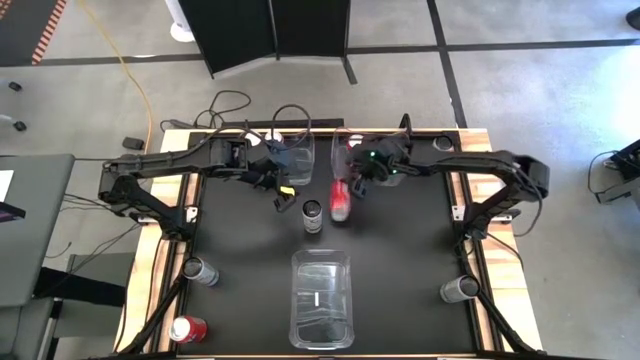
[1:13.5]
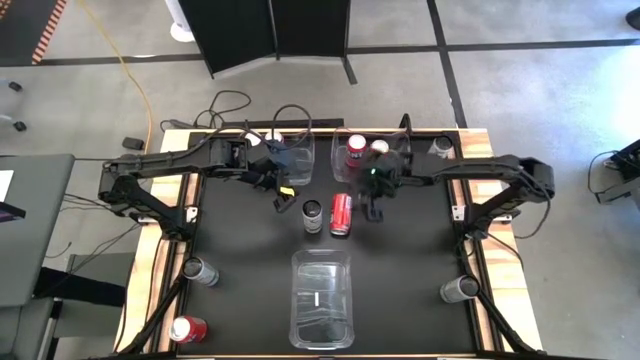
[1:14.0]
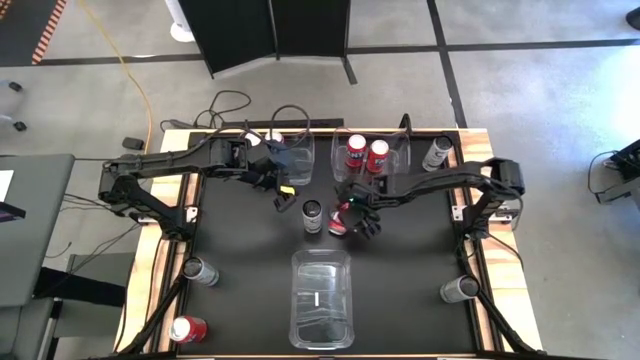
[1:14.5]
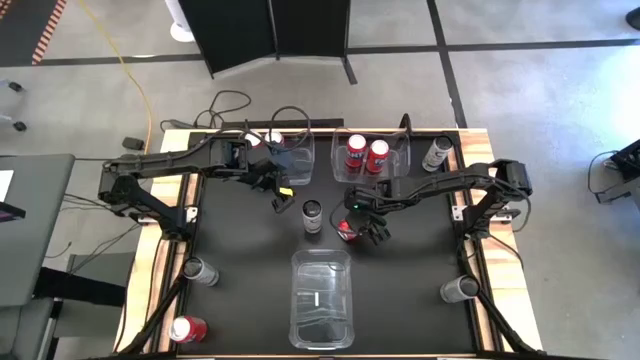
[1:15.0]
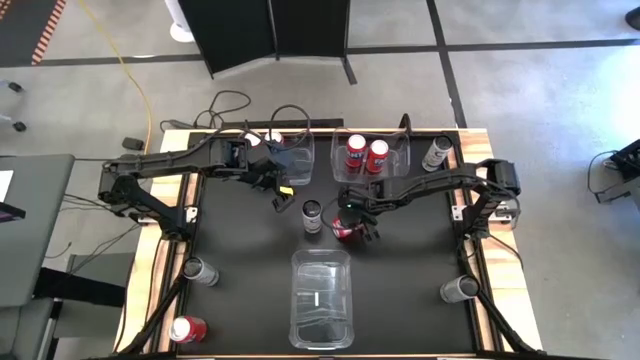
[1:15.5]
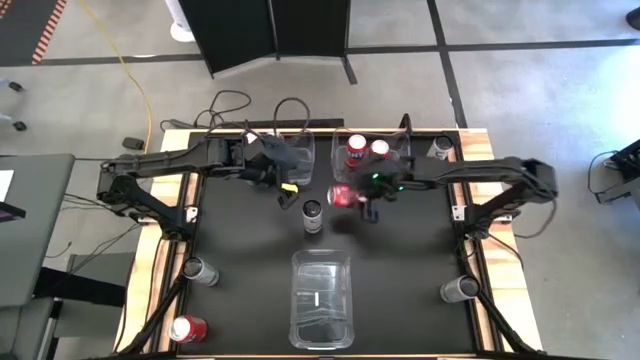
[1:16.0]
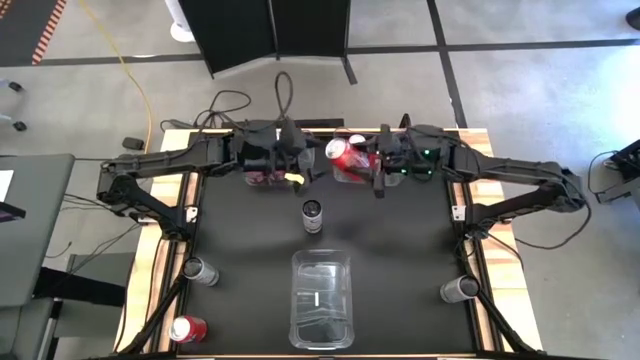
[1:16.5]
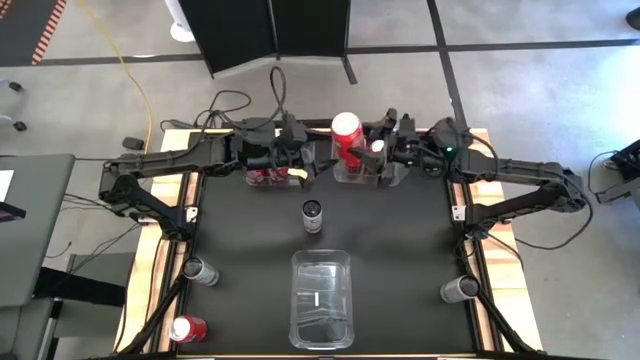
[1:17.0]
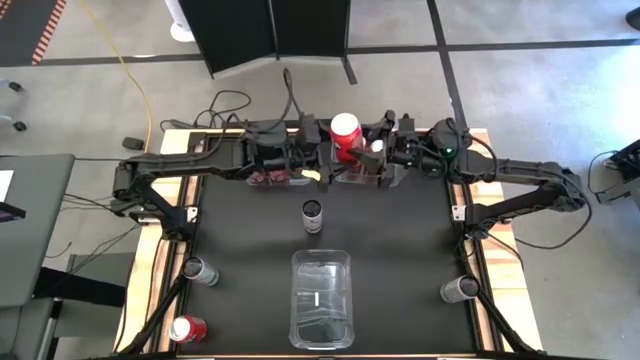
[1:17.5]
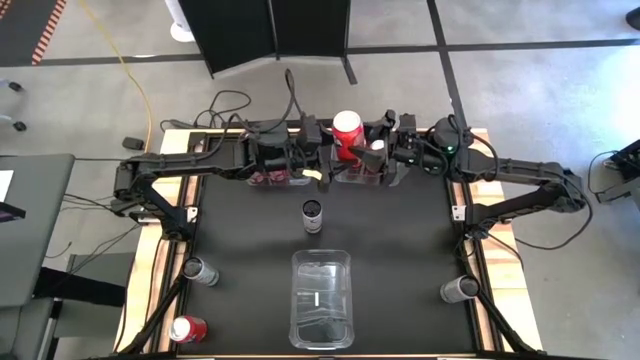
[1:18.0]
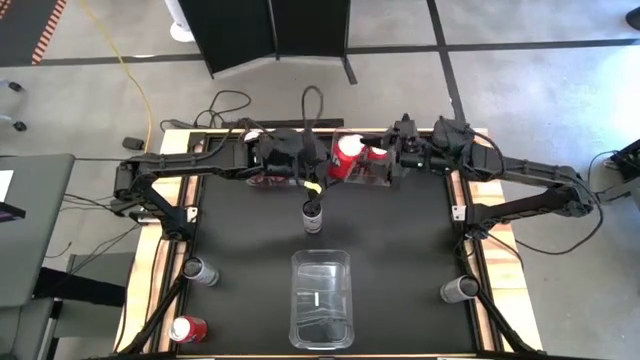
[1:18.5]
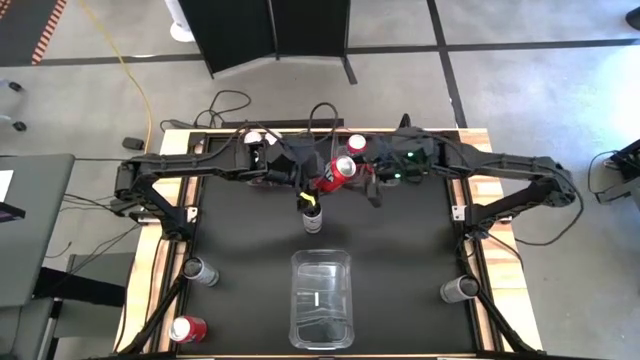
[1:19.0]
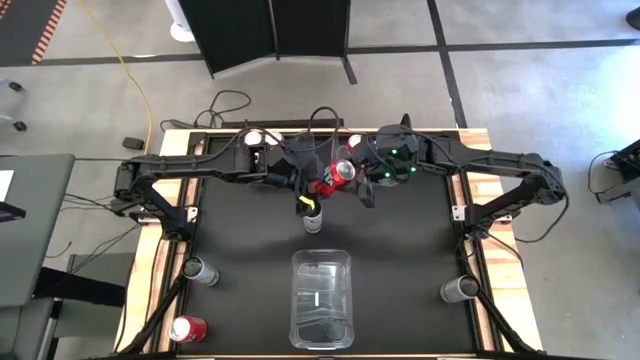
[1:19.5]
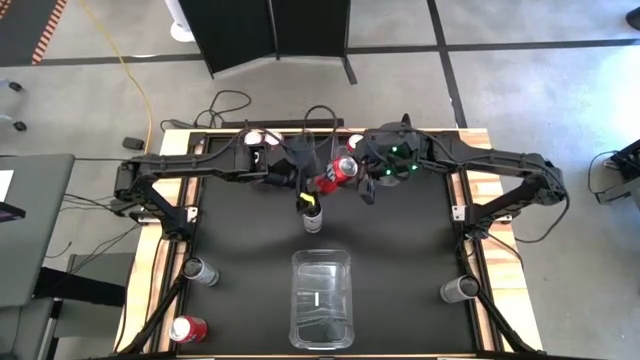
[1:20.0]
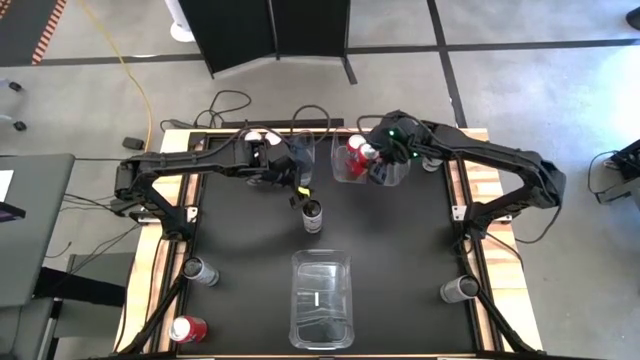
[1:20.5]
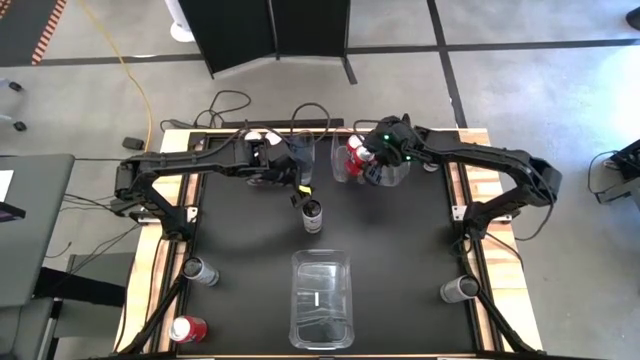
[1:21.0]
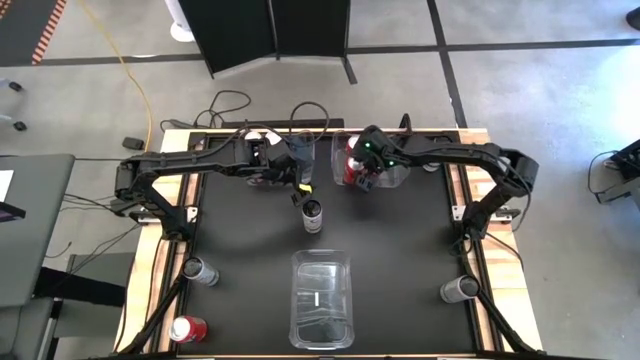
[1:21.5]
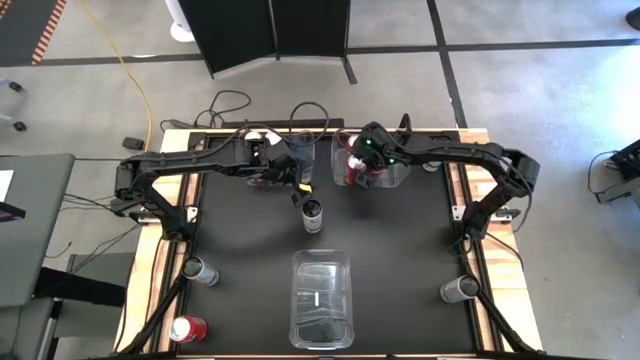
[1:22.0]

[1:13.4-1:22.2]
Task: Sort soda cans
Put the orange soda can into the right transparent bin

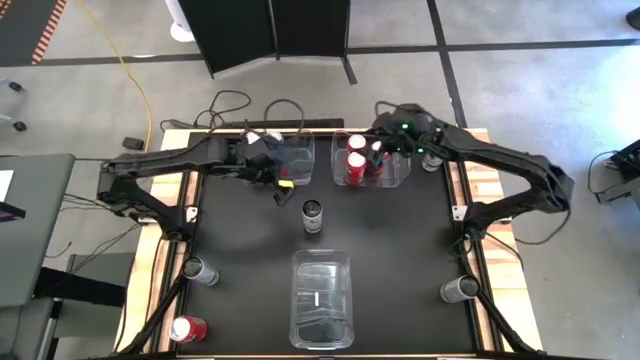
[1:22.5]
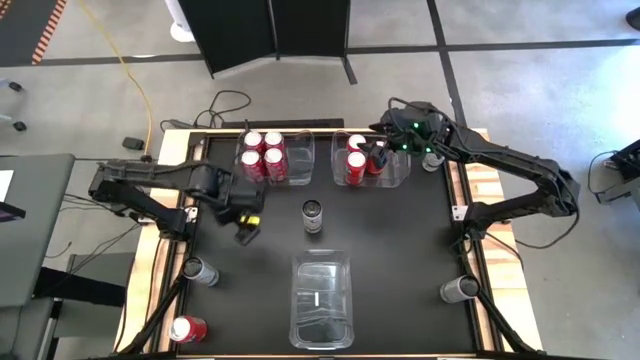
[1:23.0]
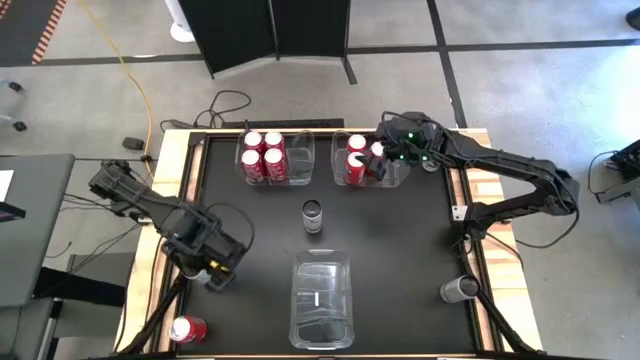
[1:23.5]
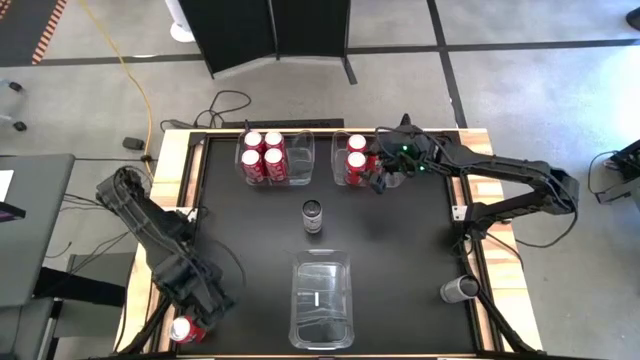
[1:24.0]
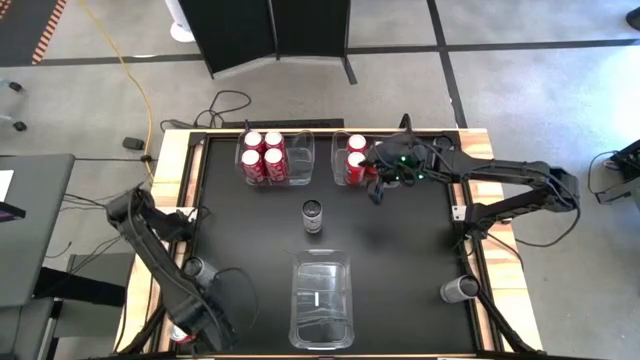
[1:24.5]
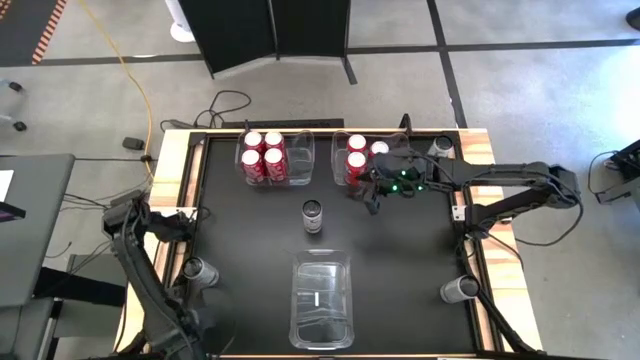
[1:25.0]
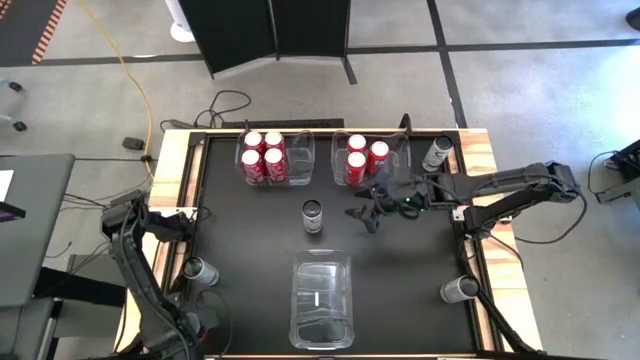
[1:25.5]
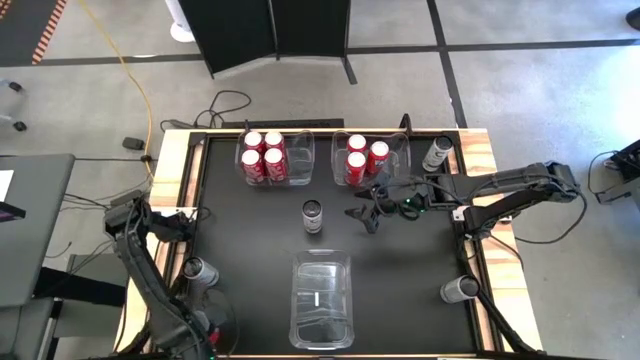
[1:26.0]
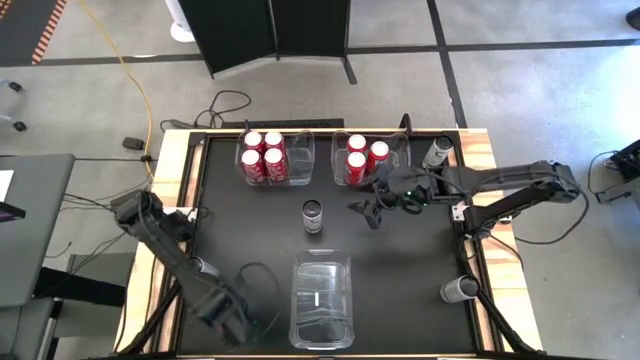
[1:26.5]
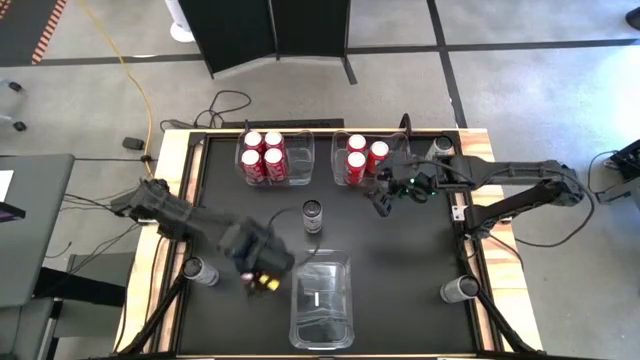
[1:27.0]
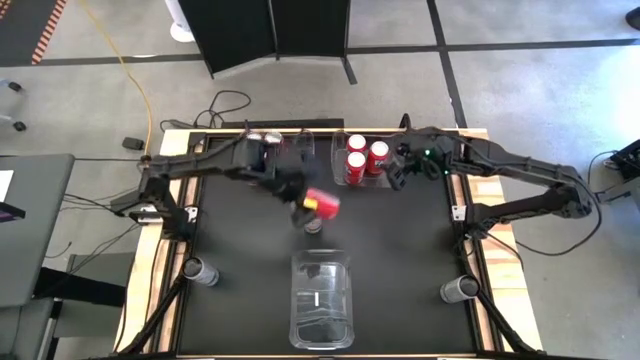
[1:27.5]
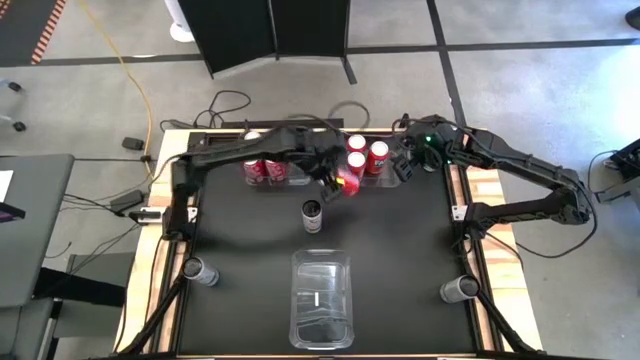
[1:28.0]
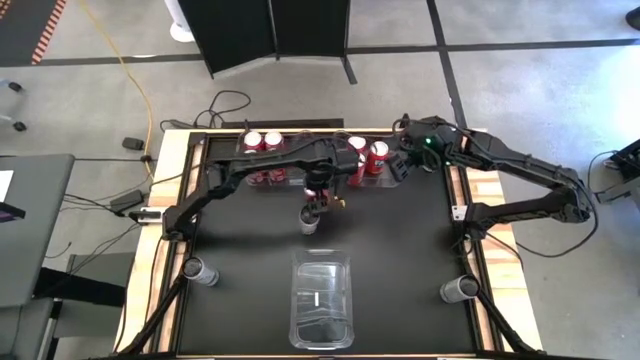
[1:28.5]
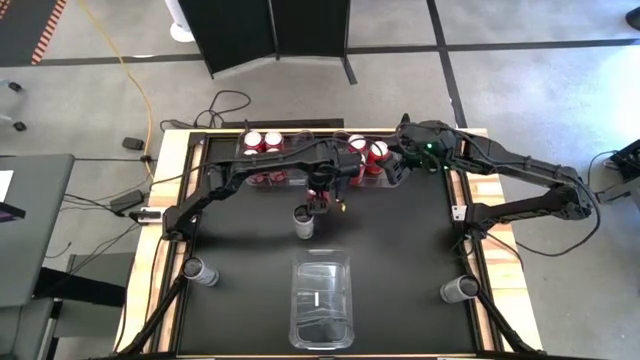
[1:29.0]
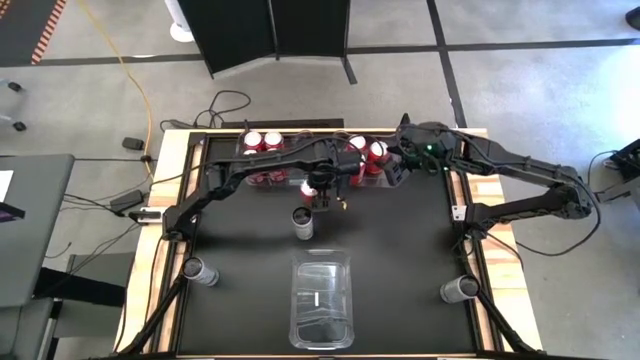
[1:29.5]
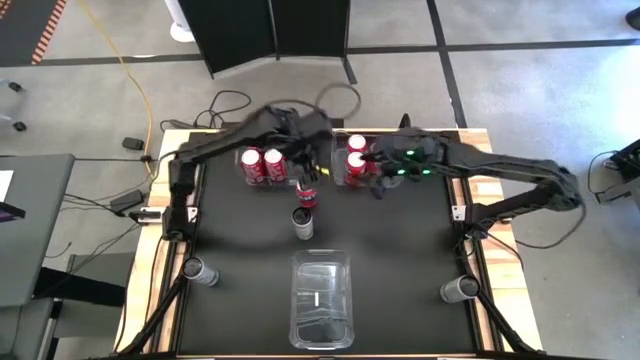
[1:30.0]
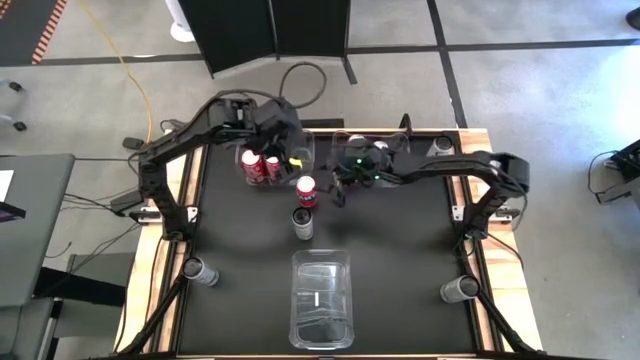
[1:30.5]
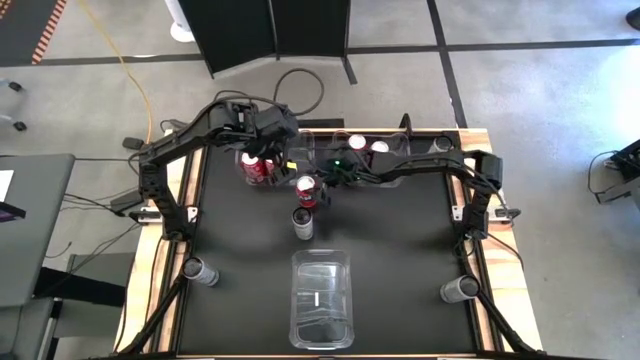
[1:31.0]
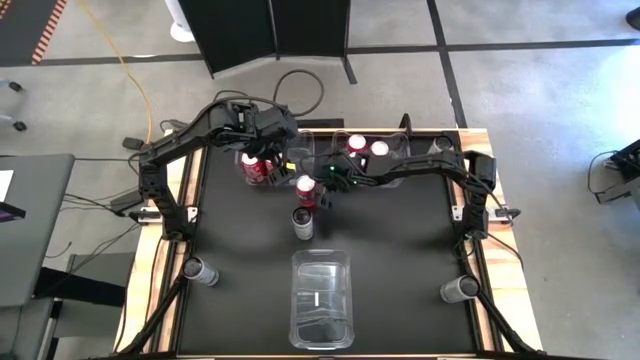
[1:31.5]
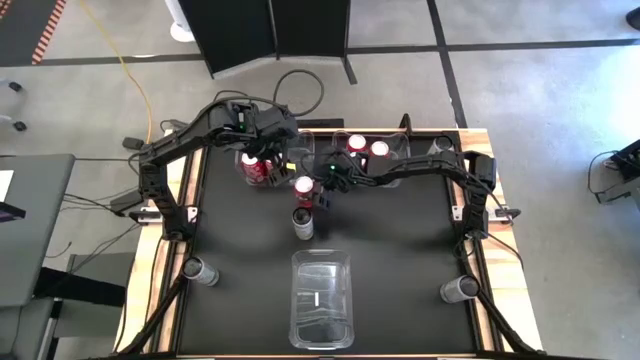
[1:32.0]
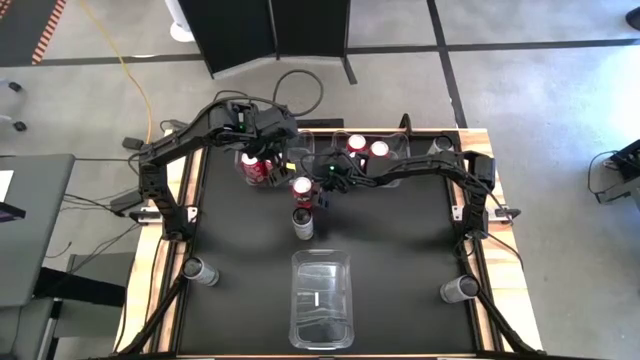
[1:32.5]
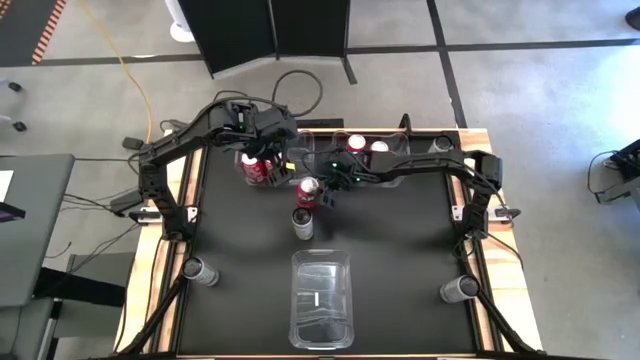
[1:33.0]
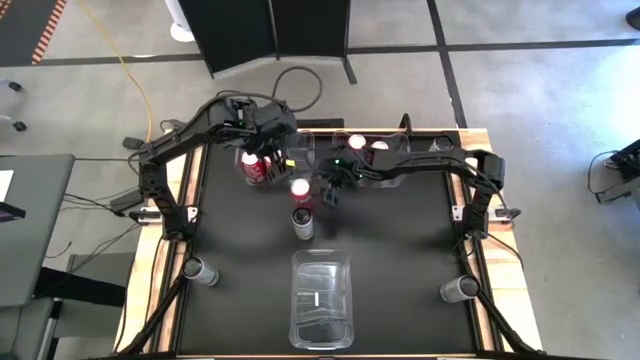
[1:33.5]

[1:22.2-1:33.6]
Put the orange soda can into the right transparent bin
